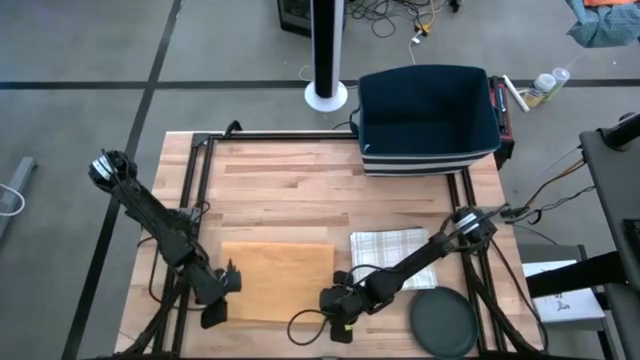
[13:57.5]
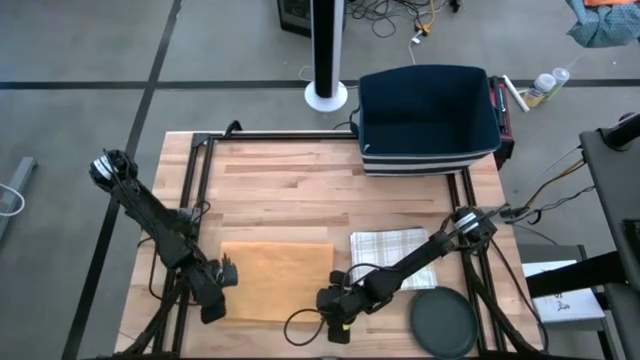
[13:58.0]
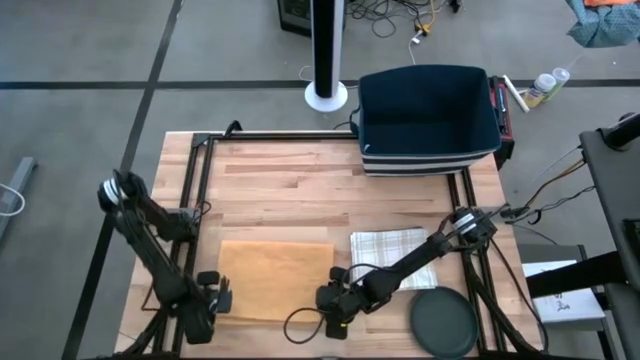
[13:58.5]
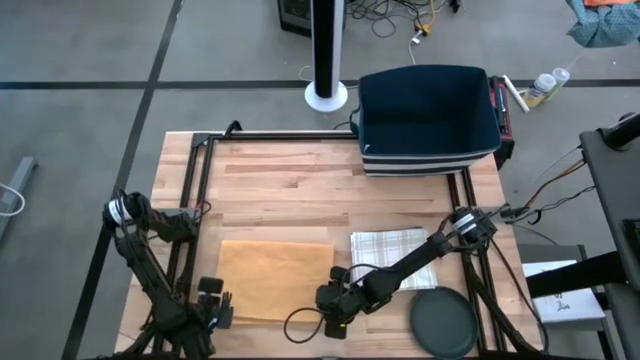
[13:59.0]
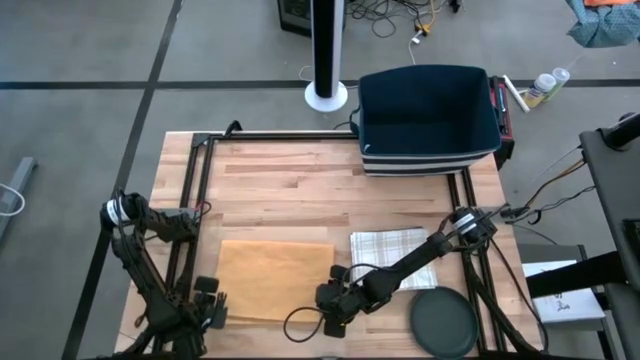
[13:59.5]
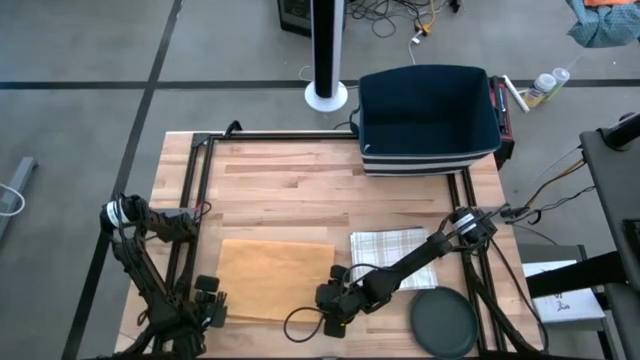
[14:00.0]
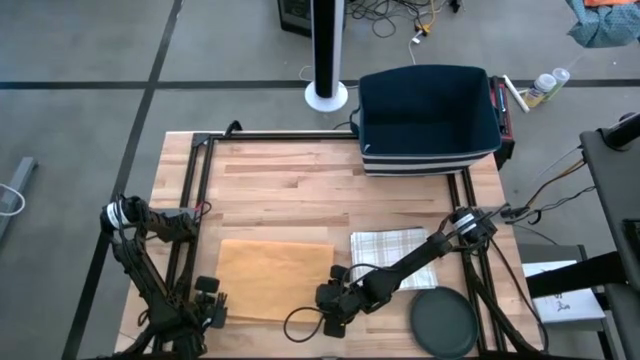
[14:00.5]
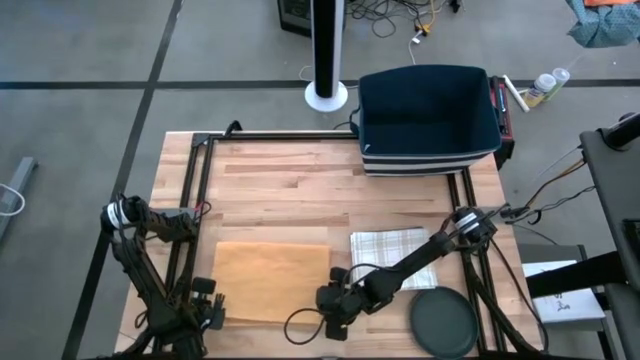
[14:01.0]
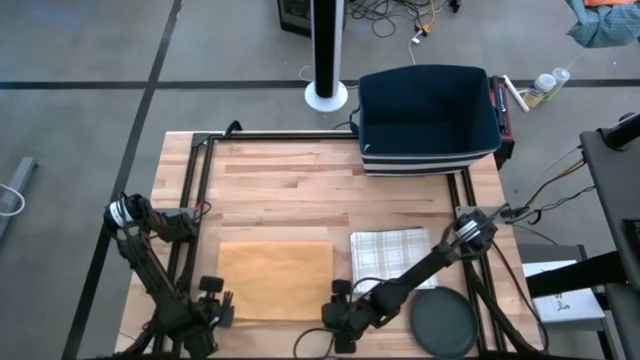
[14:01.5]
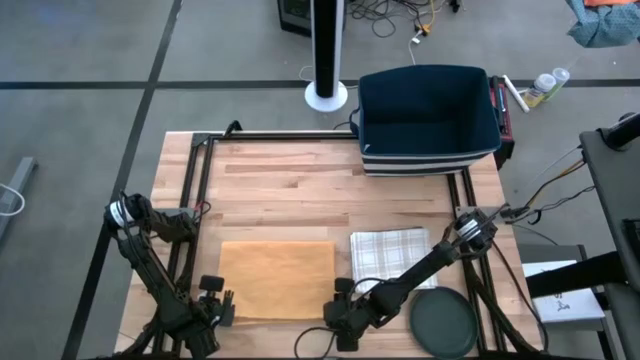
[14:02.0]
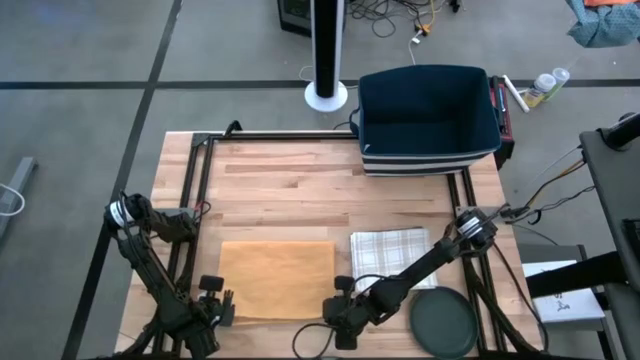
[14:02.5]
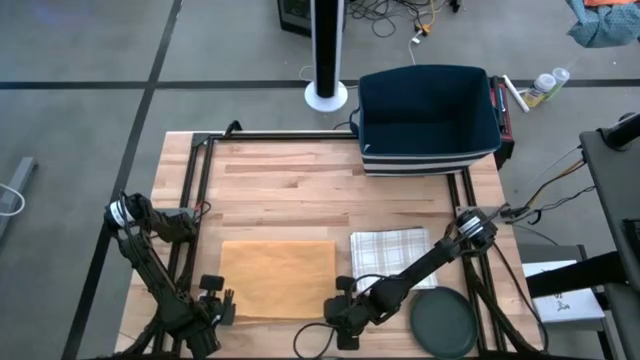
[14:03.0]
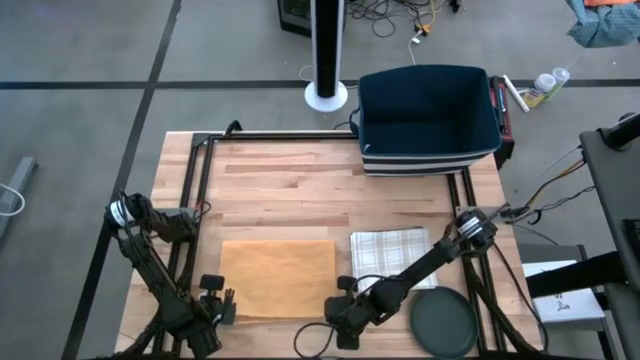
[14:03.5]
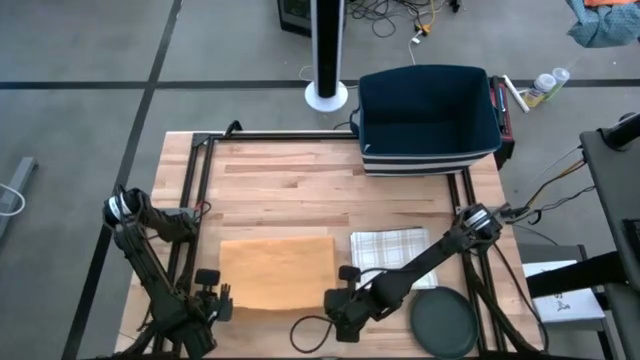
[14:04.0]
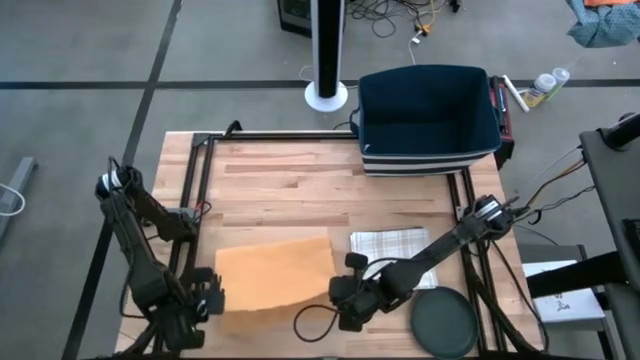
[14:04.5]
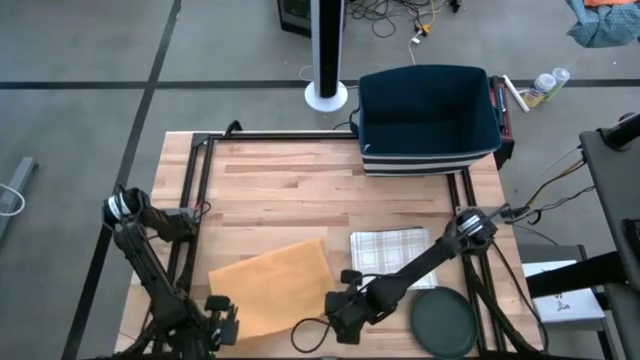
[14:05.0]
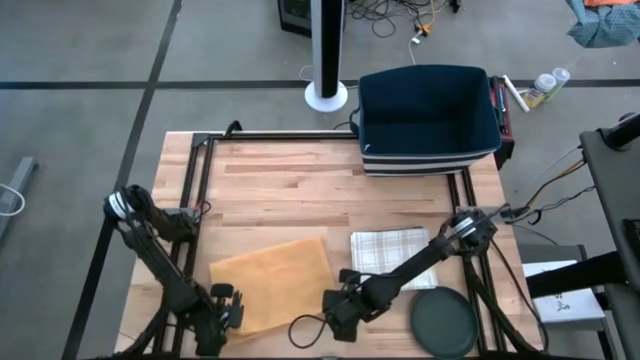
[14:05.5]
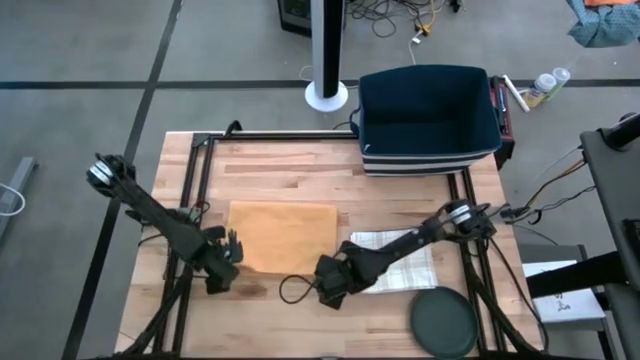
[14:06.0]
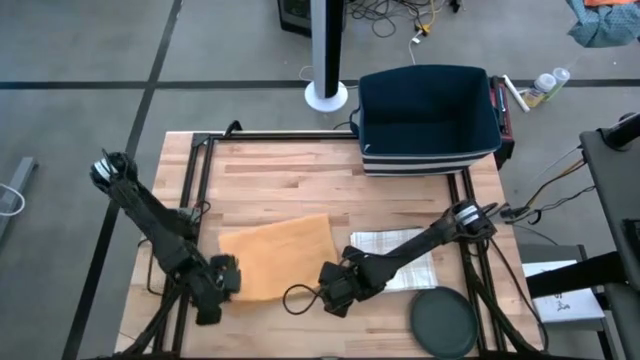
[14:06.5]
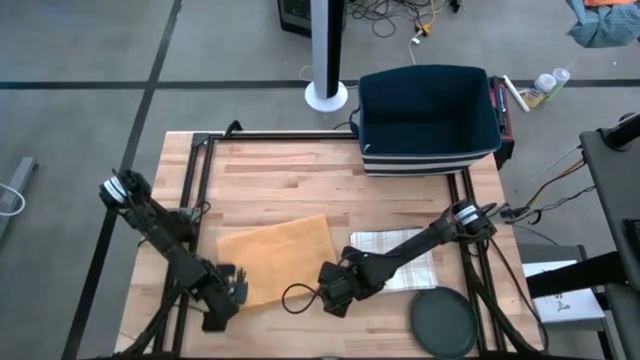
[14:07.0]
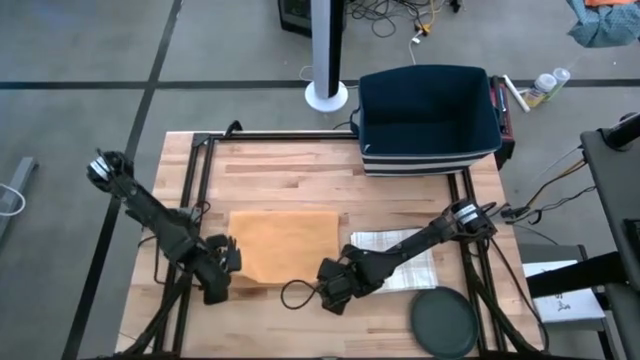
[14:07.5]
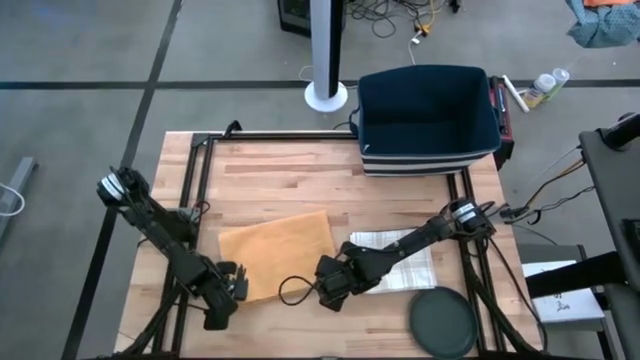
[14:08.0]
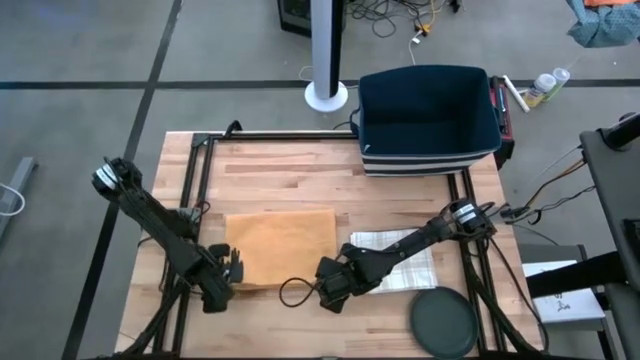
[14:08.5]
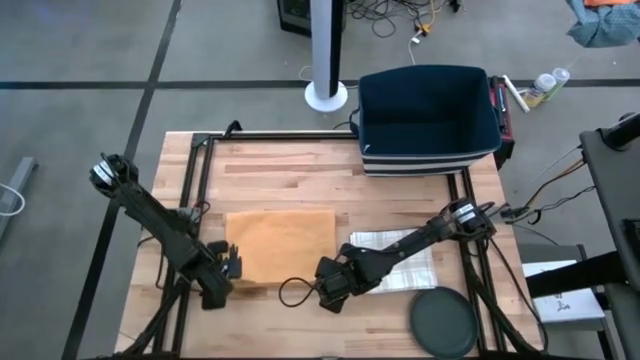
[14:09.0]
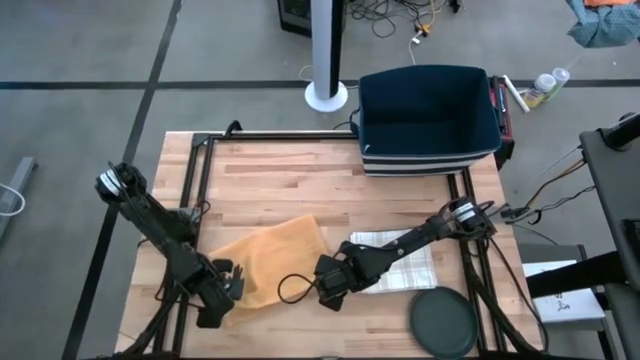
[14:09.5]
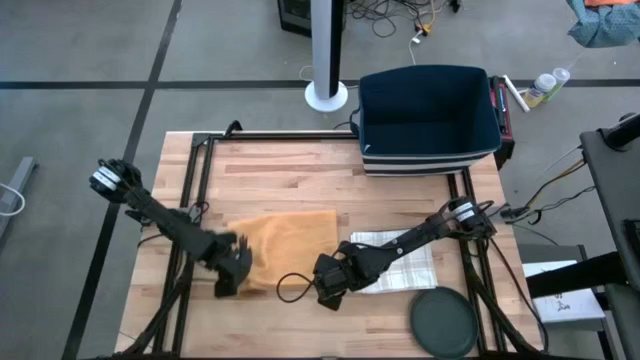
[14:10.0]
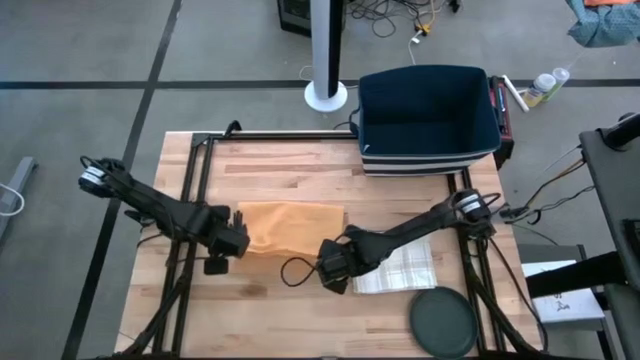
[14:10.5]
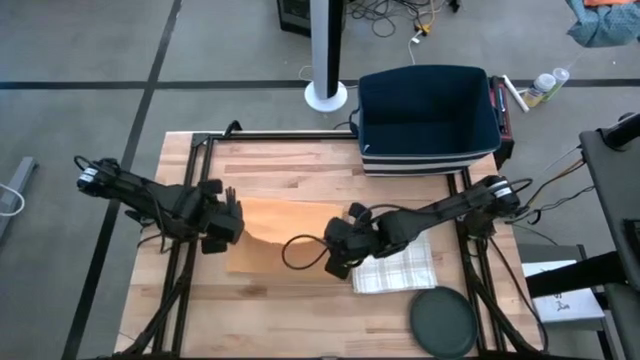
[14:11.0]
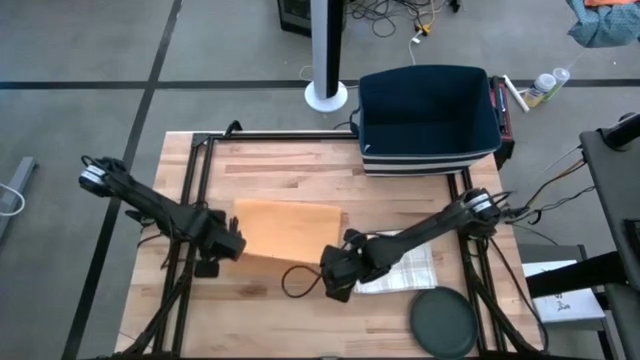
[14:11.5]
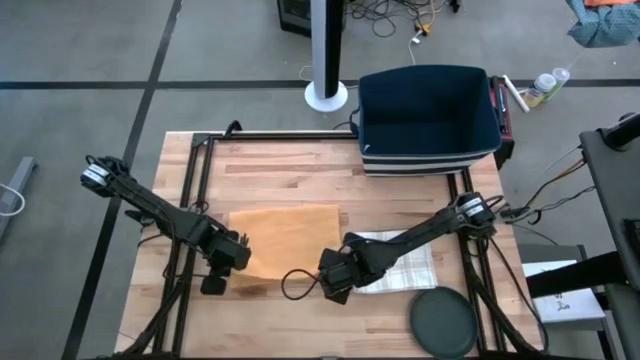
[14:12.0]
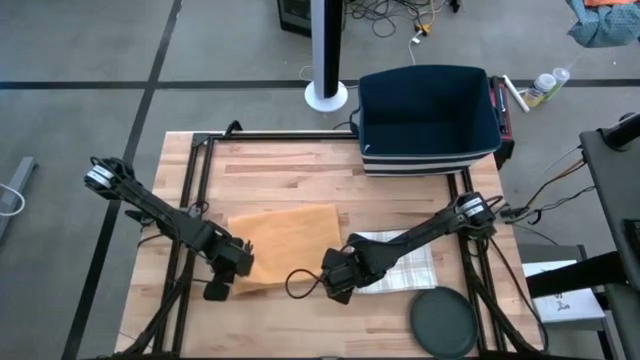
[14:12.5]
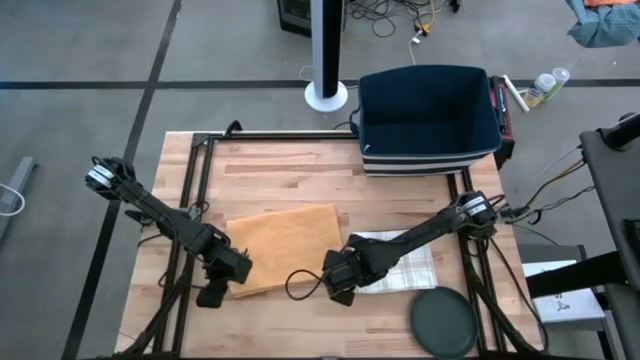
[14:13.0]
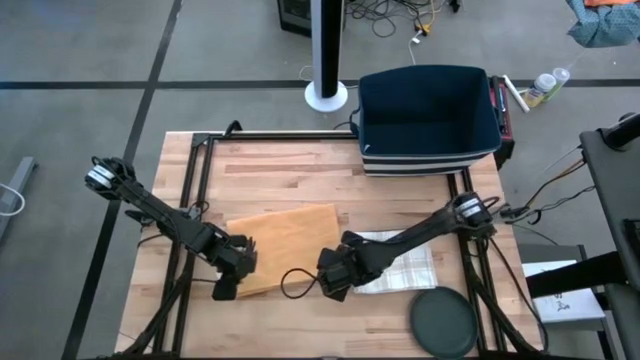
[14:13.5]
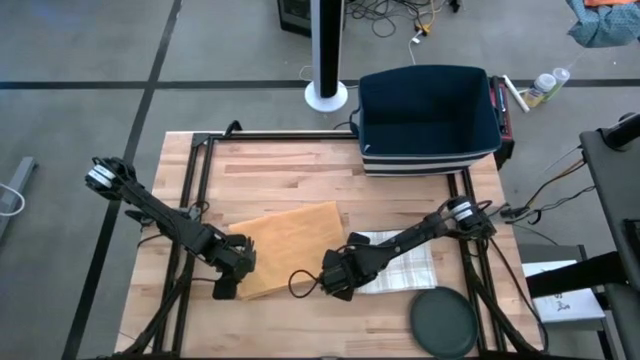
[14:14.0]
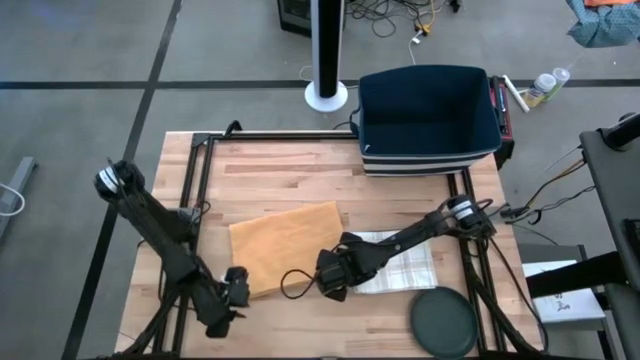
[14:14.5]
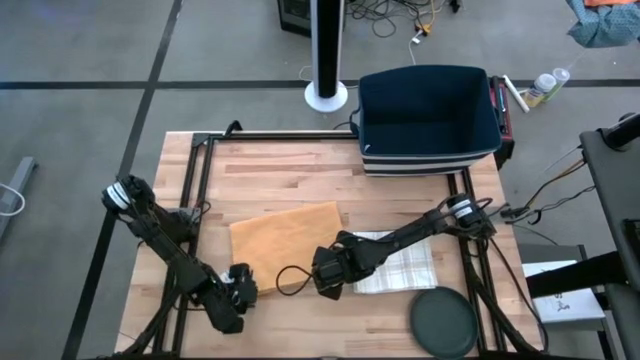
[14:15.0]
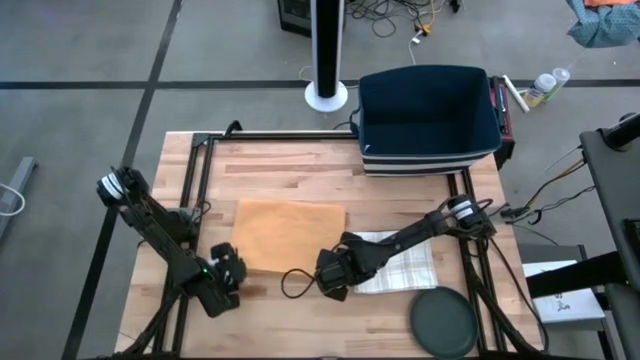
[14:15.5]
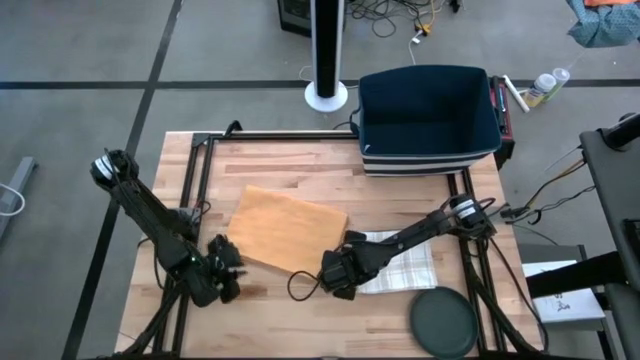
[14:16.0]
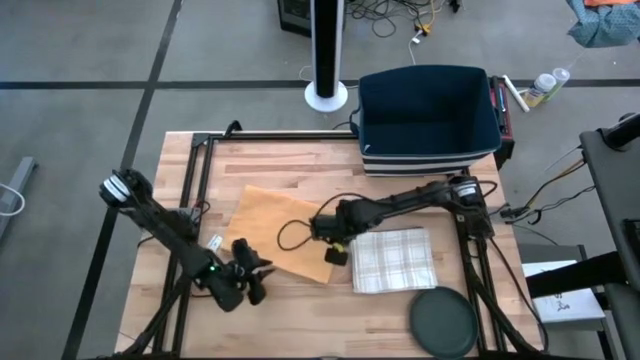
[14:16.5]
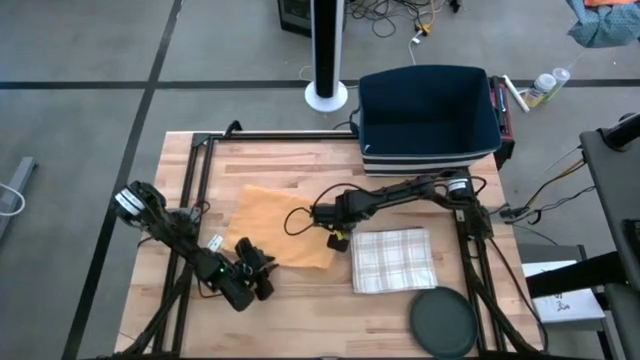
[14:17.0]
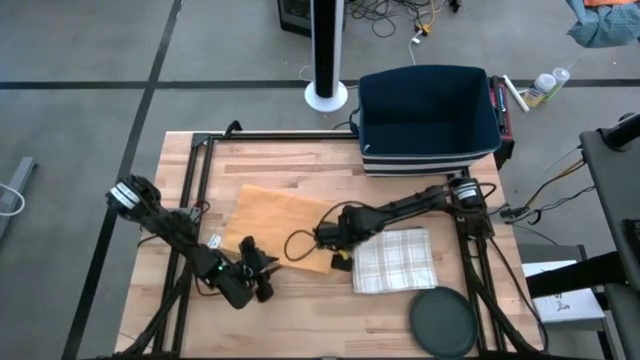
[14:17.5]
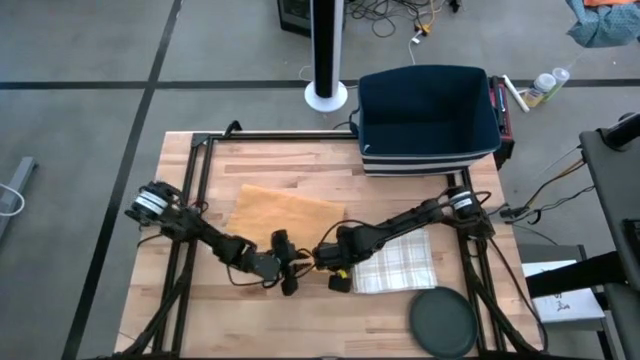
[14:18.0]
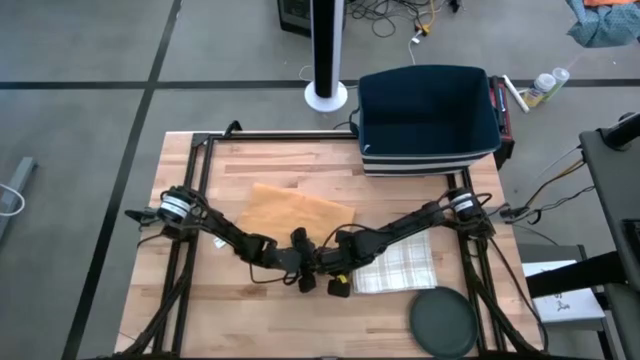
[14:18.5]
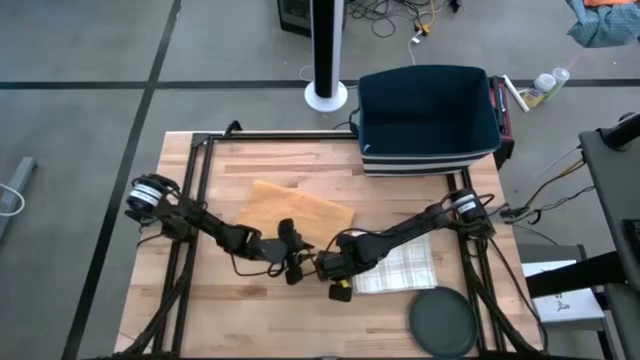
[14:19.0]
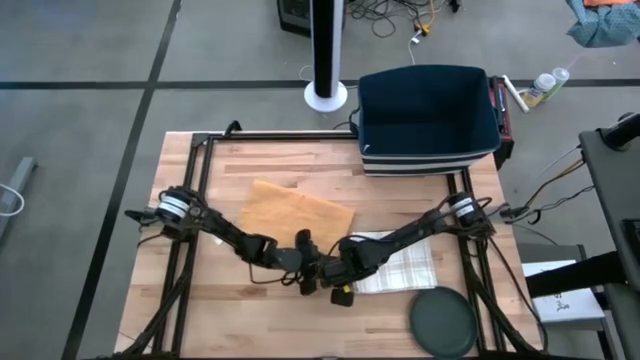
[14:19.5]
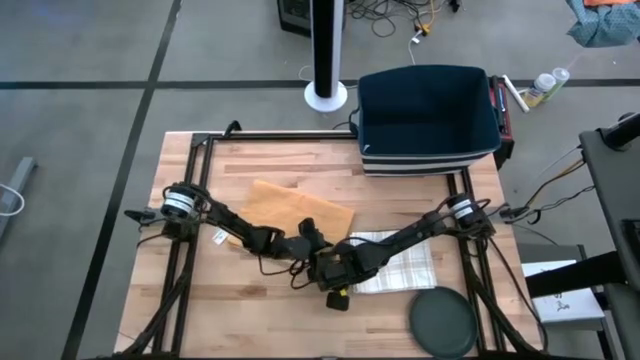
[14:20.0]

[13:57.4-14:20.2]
Task: Fold kitchen towel into neat rectangle
Fold the orange towel
